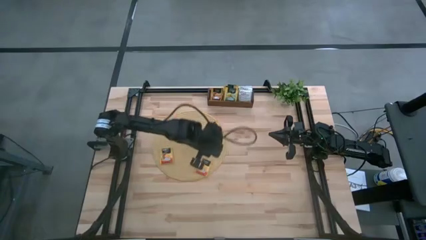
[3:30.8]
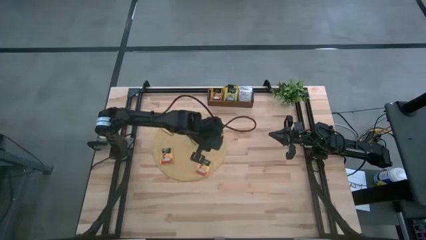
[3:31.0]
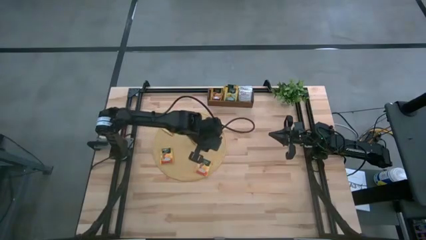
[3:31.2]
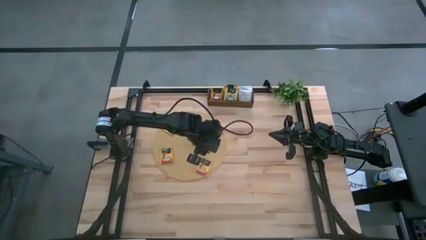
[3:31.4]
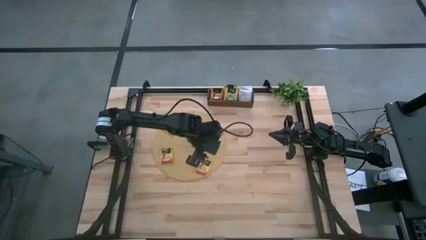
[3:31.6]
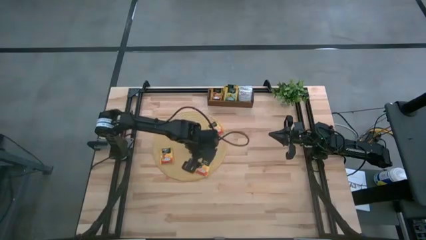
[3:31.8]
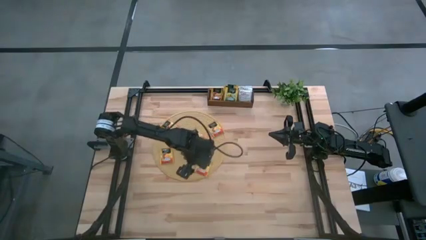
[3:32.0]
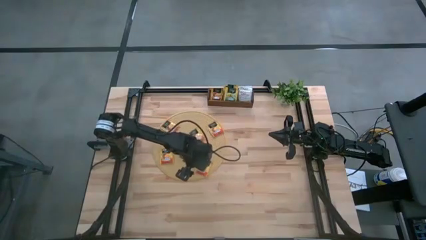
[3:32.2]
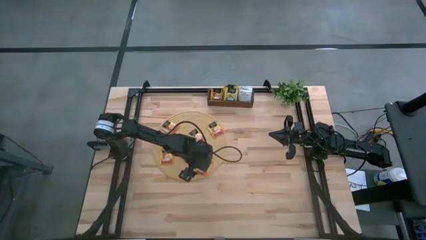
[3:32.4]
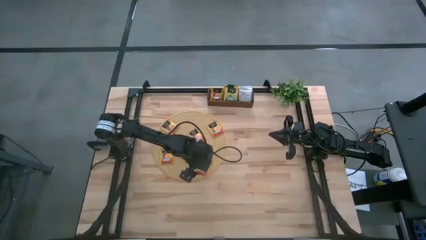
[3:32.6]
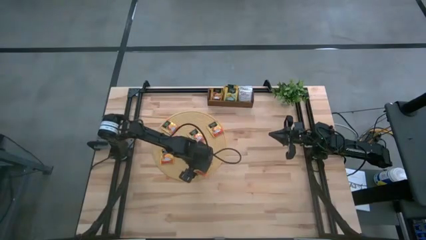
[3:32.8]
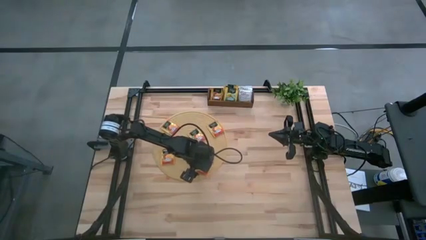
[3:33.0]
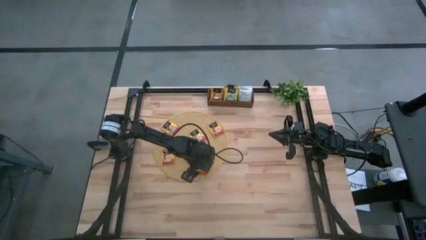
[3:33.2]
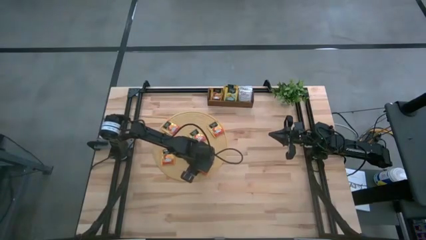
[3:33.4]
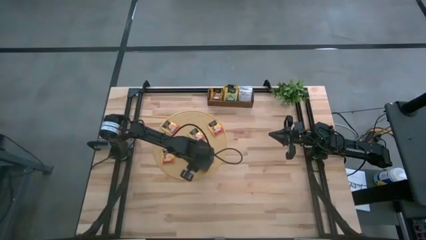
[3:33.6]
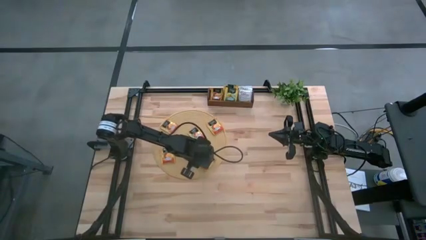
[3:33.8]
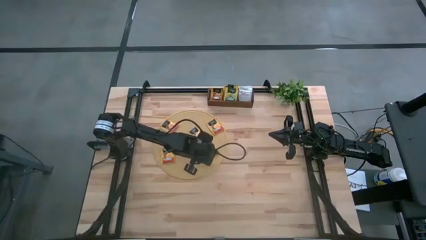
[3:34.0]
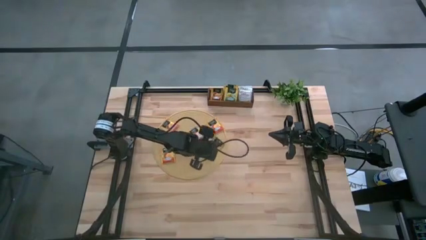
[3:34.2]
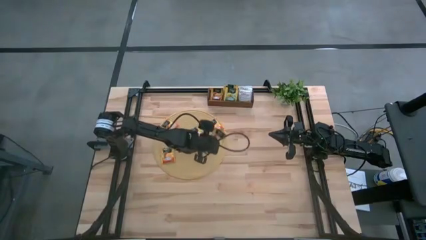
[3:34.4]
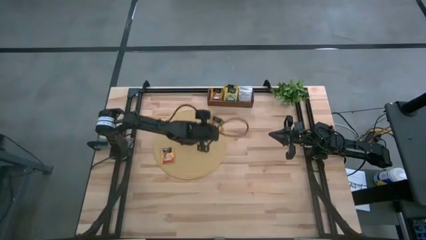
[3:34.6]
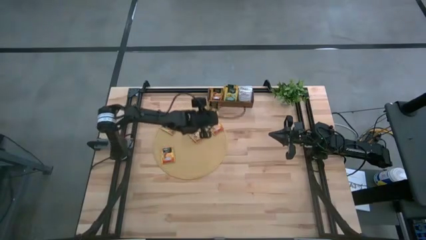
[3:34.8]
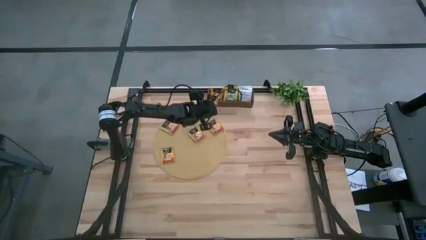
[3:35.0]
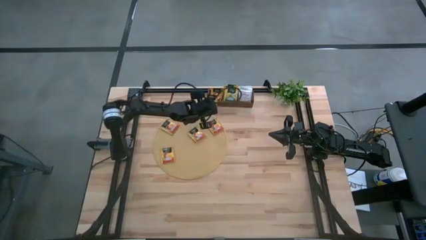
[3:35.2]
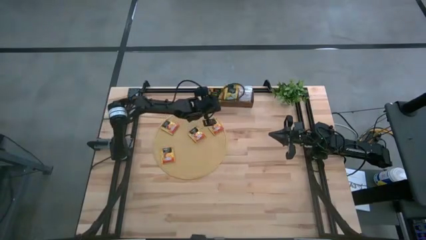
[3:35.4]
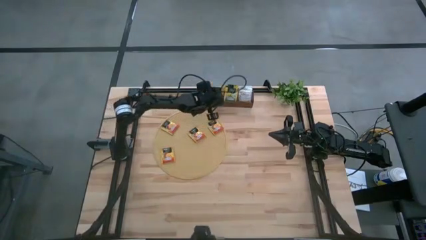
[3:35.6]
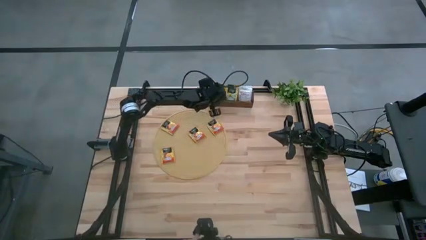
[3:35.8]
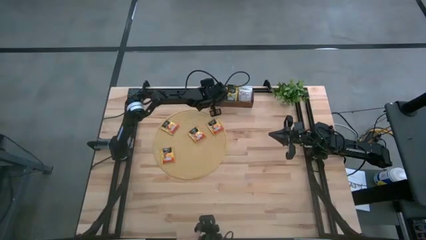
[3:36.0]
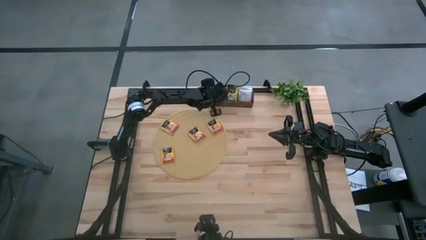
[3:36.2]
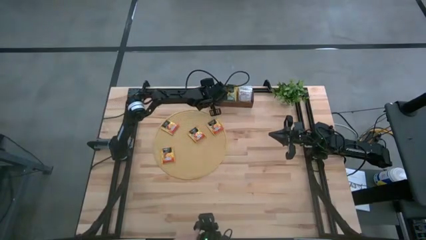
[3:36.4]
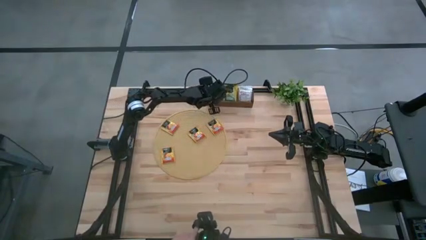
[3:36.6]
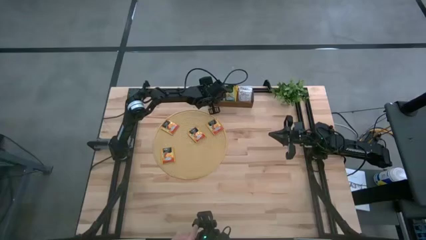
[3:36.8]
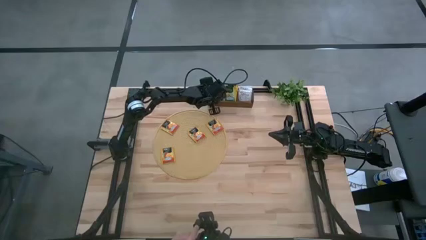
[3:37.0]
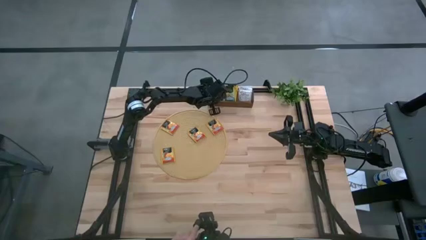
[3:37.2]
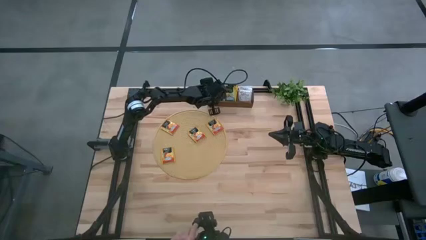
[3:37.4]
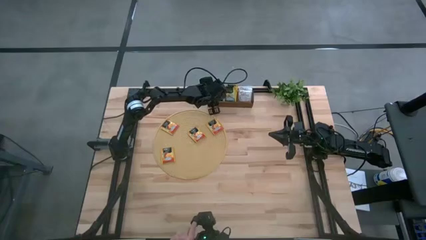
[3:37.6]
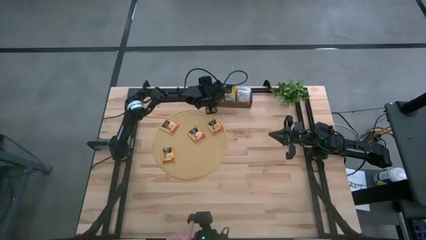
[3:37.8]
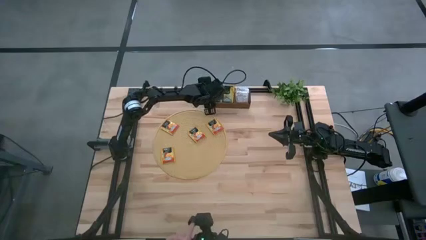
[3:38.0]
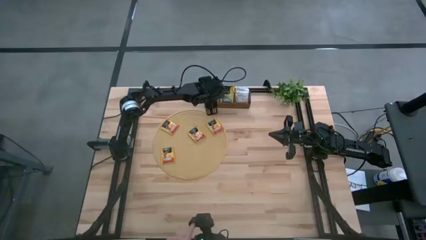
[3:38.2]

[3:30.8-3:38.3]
Task: Pick & Place Tea
Put the orange tea bag into the left section of the wooden organizer

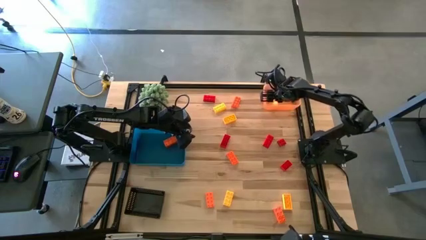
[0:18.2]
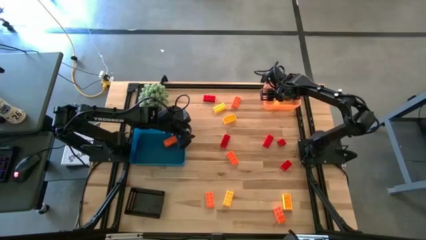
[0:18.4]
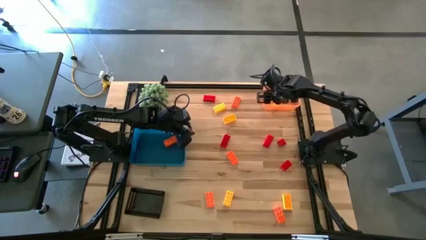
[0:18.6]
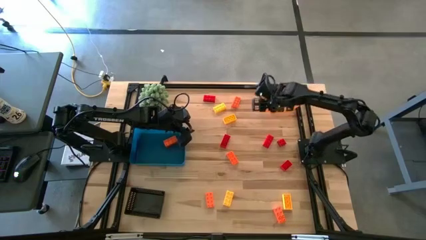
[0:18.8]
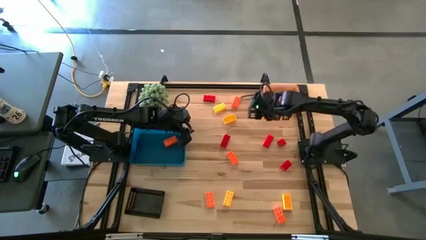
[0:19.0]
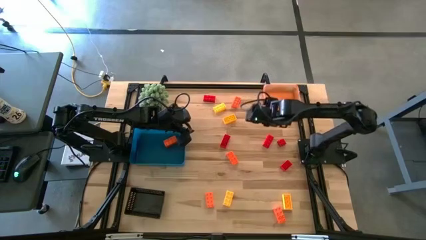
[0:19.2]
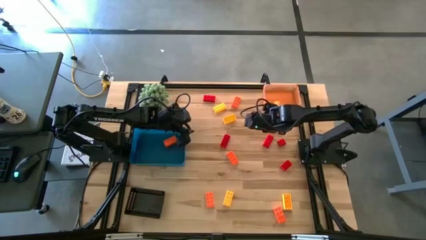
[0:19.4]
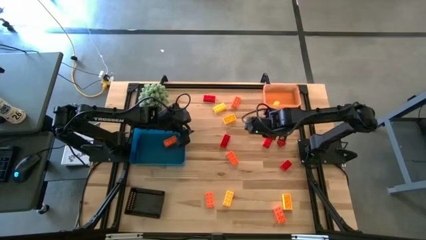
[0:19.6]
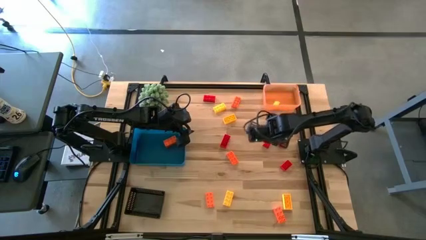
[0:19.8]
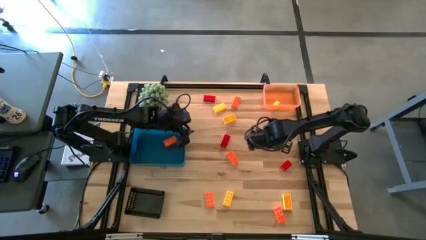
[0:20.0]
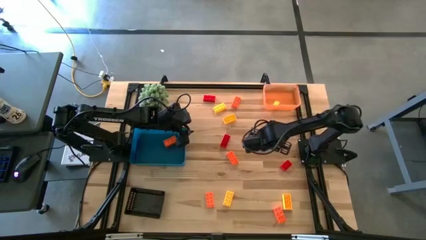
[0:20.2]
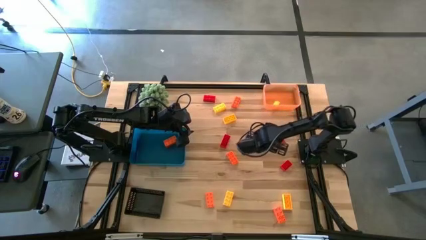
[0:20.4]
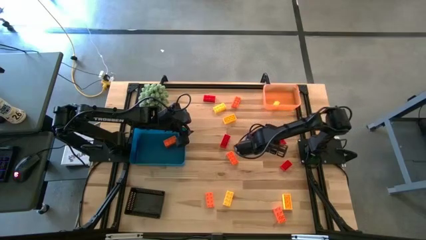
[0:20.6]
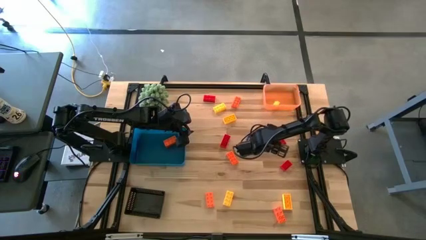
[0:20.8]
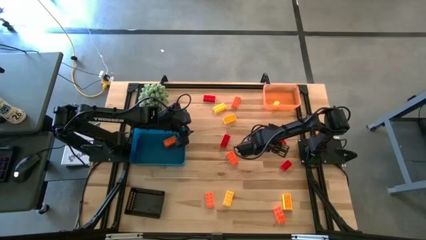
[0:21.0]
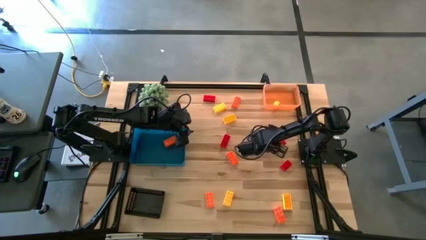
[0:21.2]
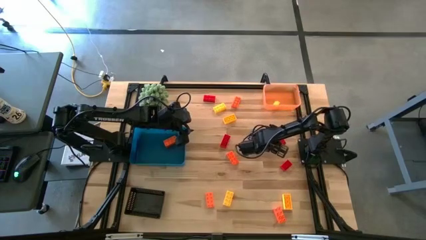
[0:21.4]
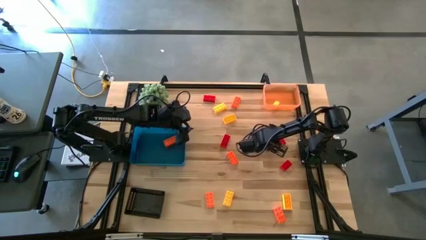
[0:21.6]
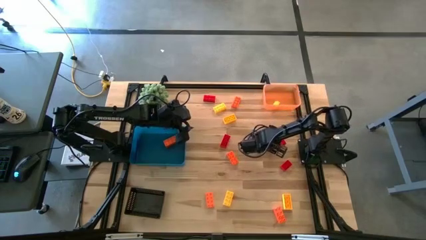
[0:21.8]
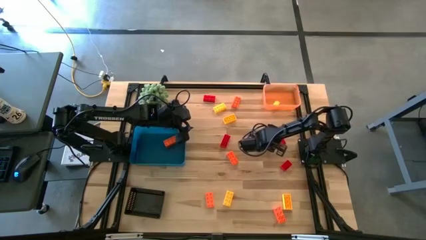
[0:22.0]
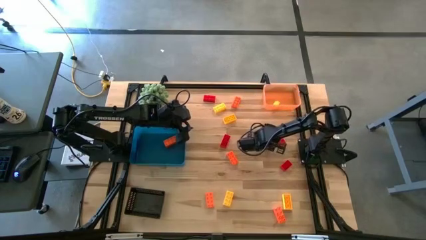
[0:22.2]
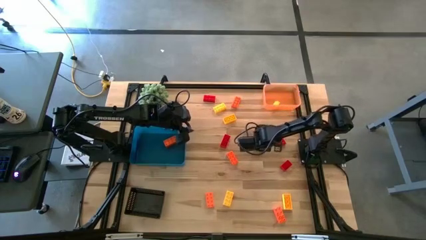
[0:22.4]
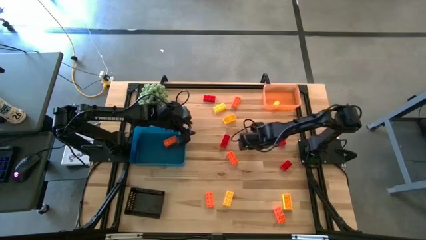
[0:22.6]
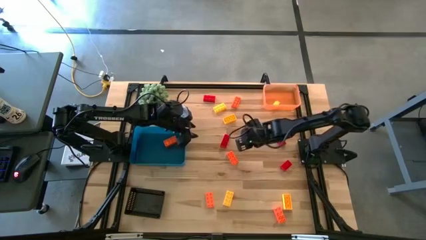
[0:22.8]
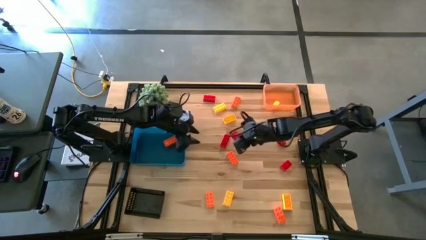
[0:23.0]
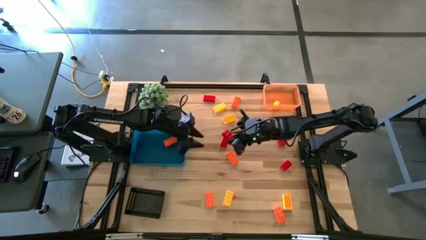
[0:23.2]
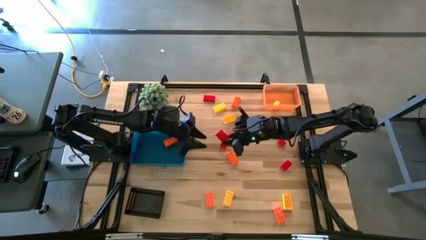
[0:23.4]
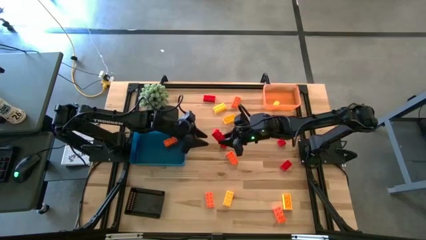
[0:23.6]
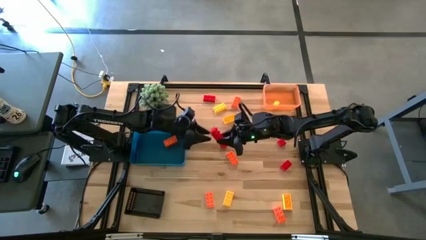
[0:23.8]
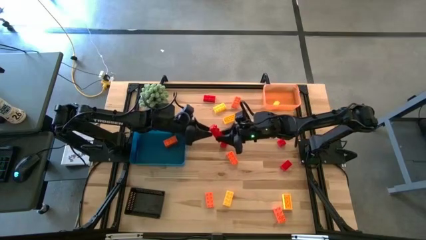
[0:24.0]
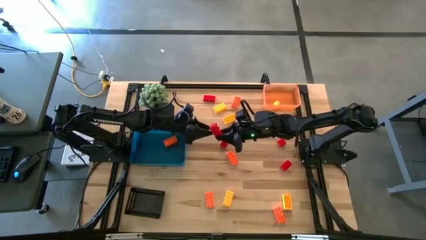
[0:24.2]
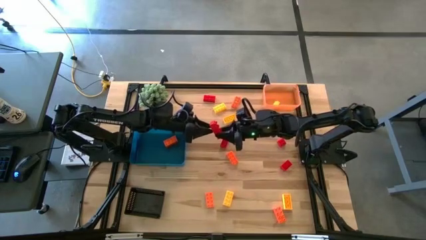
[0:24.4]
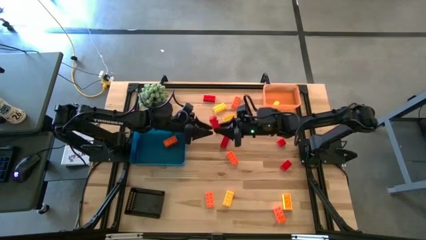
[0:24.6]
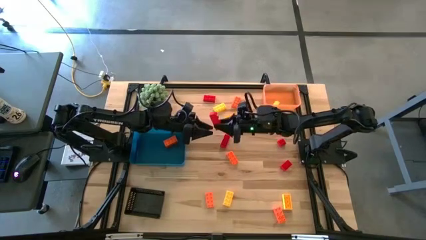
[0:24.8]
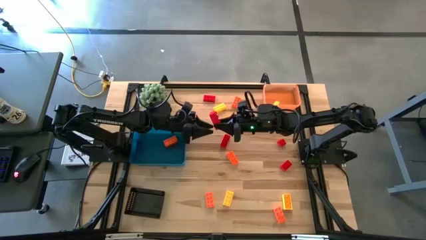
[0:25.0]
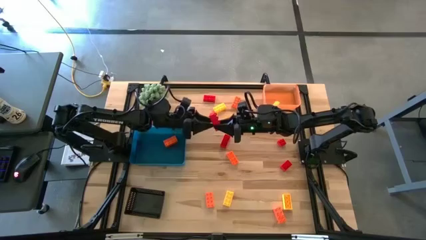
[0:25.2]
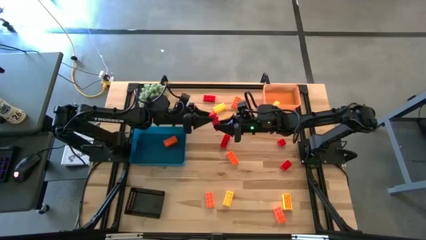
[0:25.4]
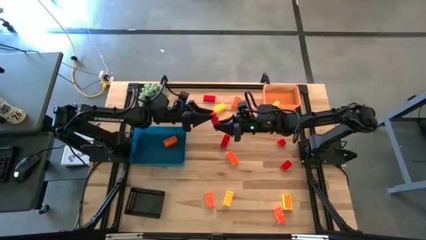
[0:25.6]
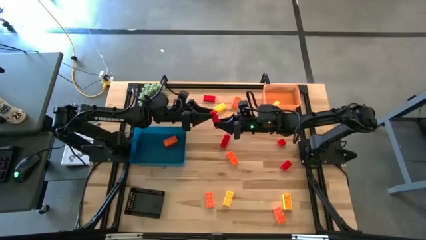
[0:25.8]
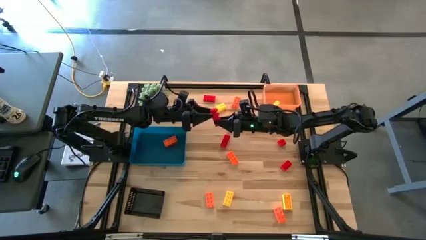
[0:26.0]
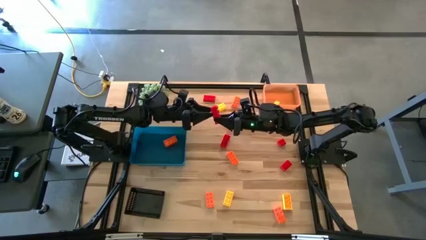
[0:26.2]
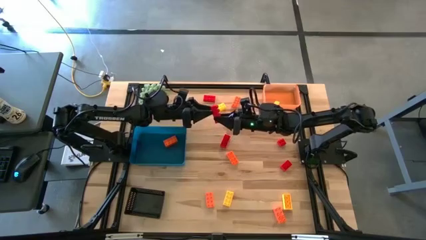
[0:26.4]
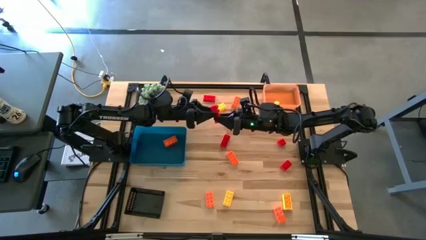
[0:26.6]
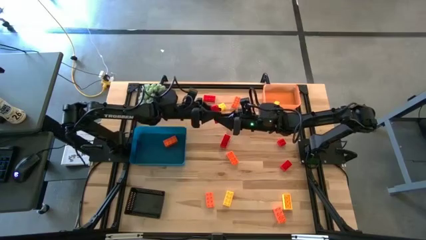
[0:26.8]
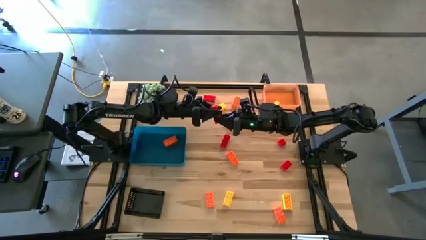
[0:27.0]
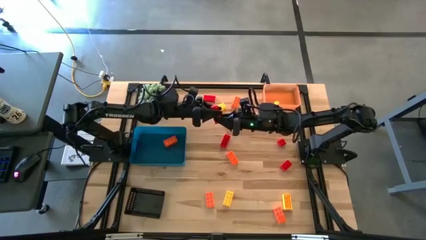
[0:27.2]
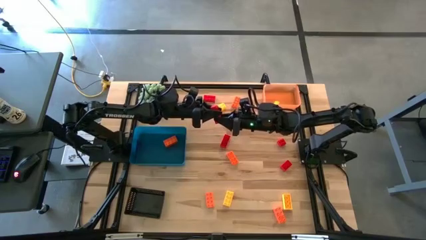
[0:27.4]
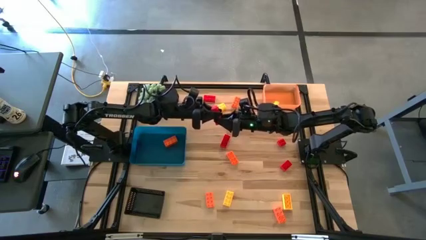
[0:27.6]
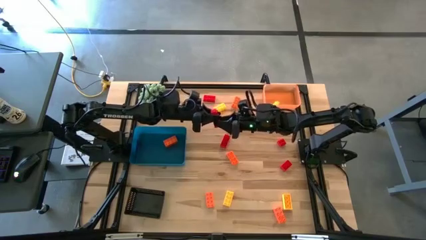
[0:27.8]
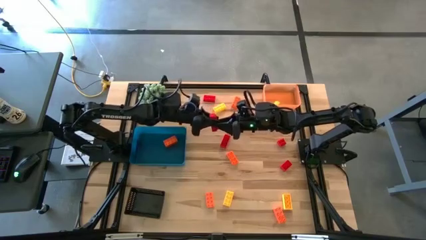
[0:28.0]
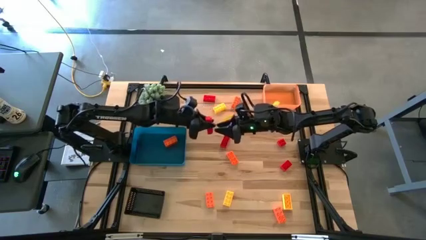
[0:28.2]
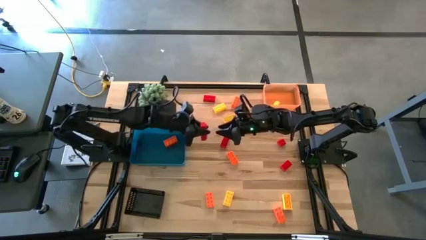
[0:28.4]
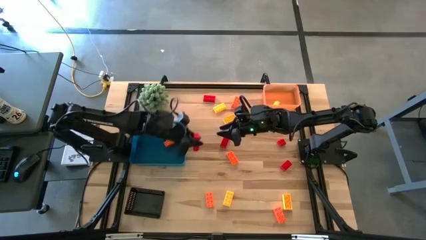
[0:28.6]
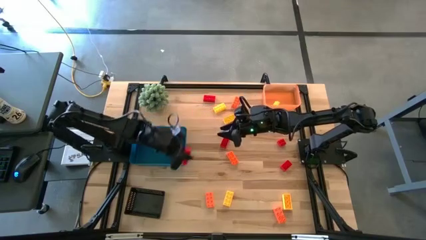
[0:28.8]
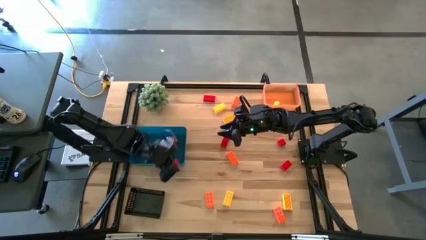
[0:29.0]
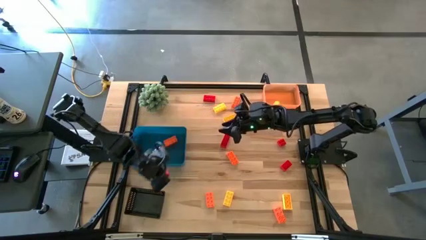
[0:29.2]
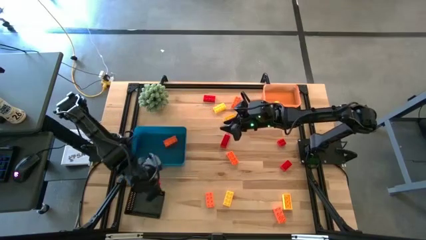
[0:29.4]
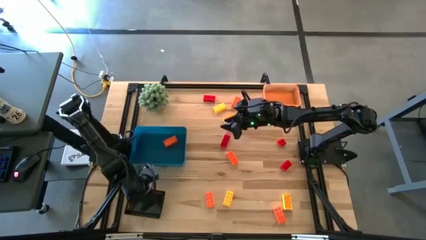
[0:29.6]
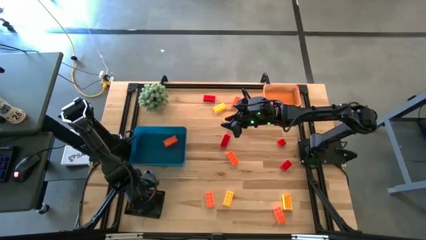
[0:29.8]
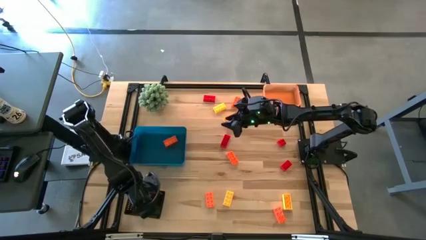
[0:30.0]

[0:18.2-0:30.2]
Task: Sort & place blocks by color
Put the red game piece into the black bin
